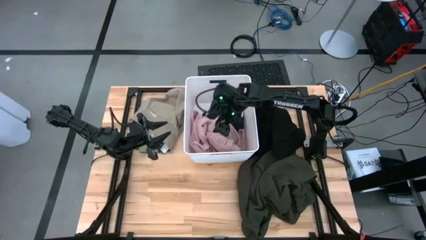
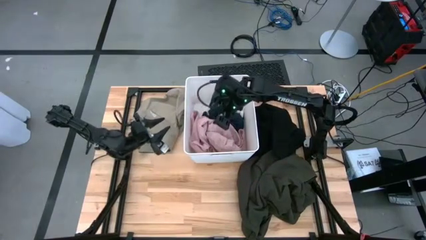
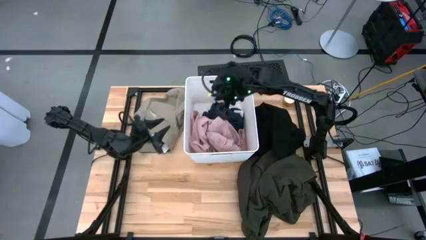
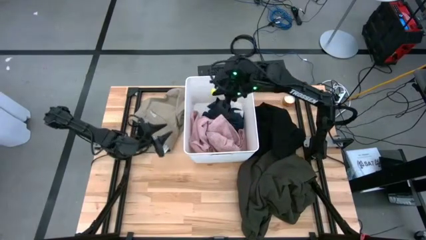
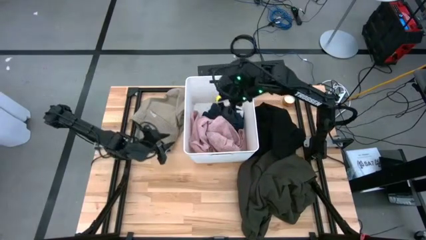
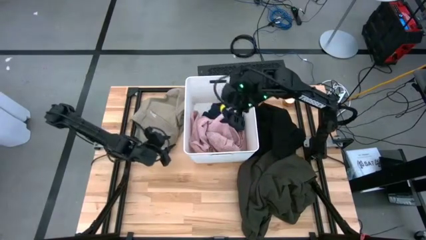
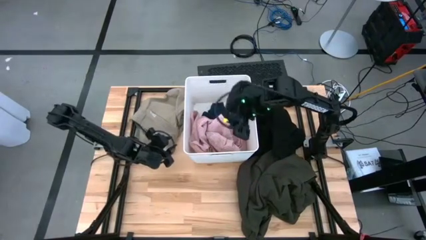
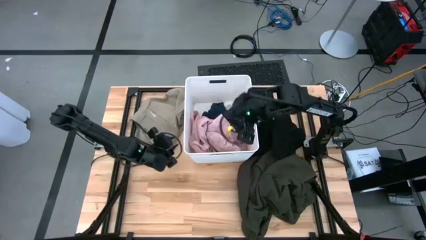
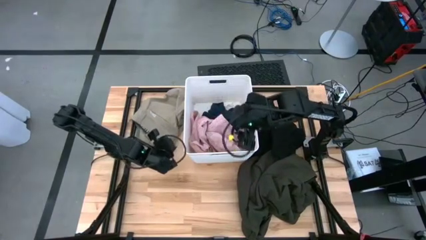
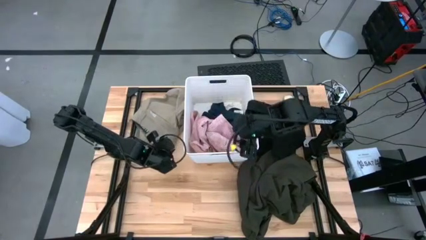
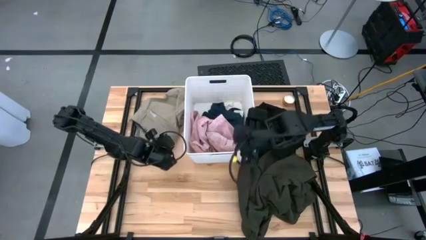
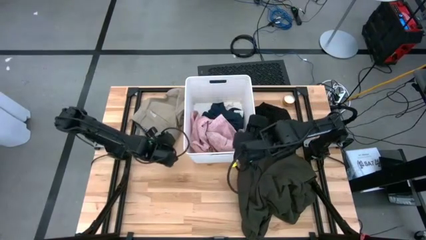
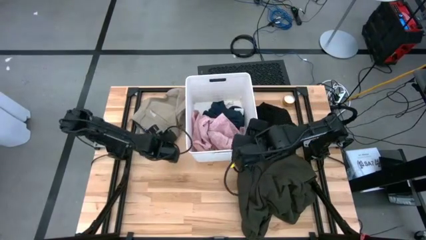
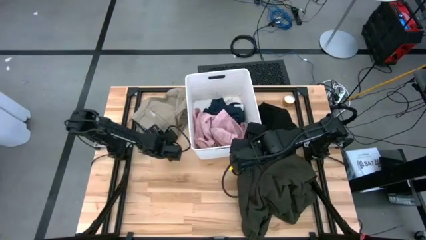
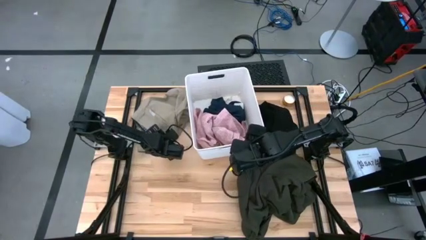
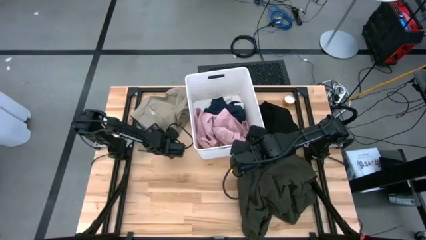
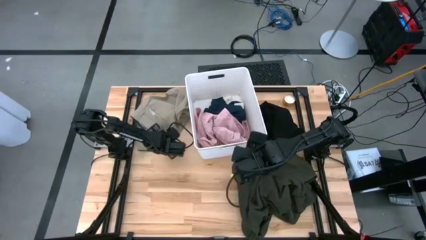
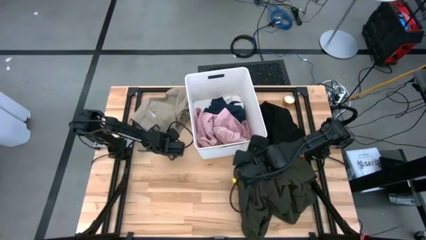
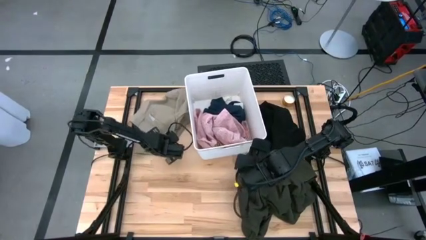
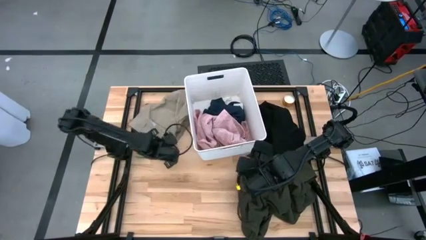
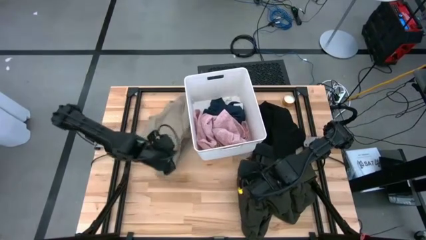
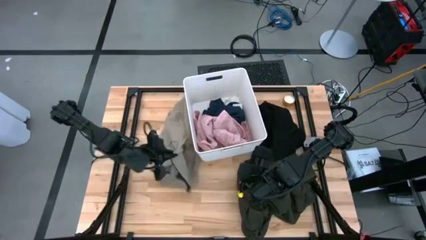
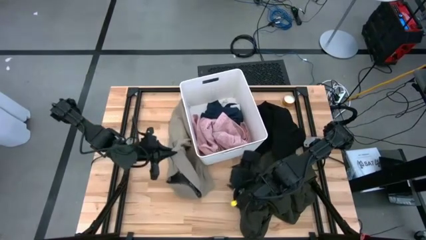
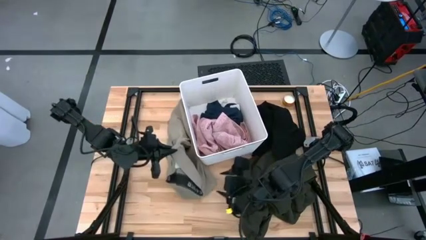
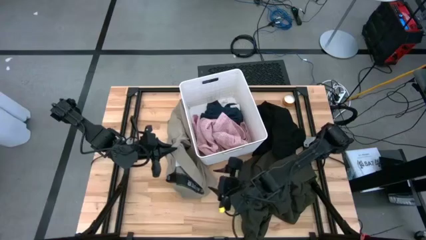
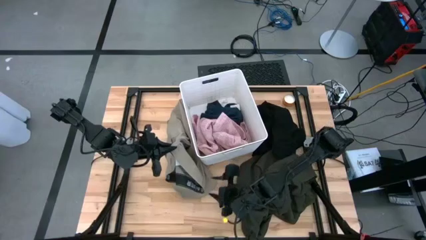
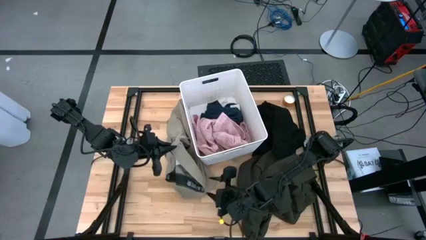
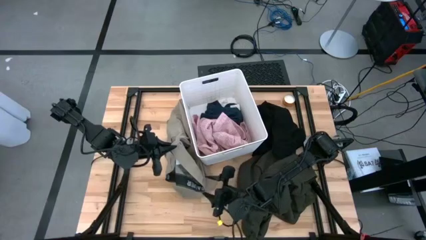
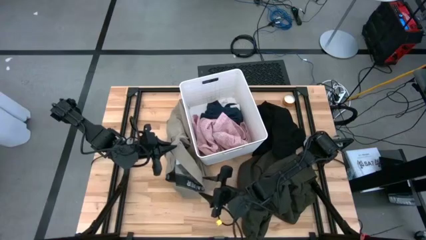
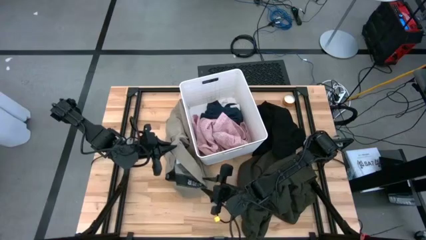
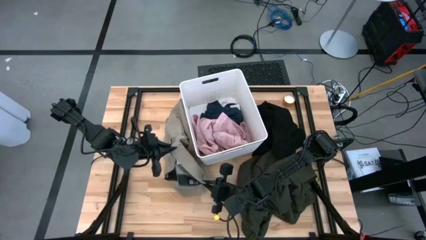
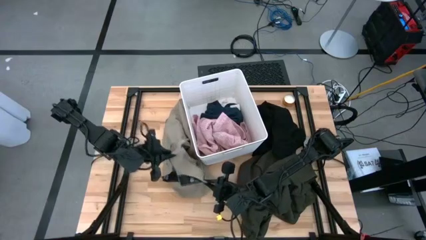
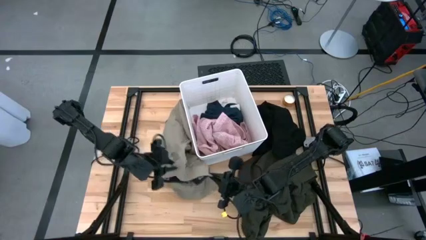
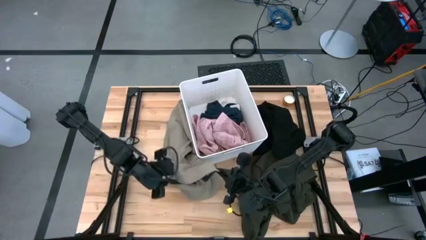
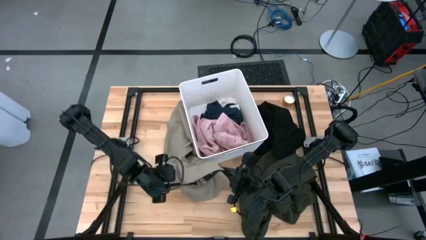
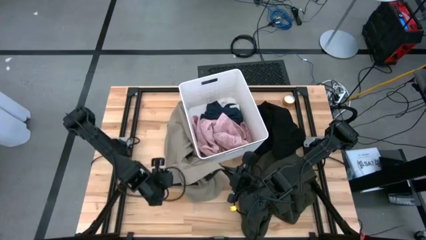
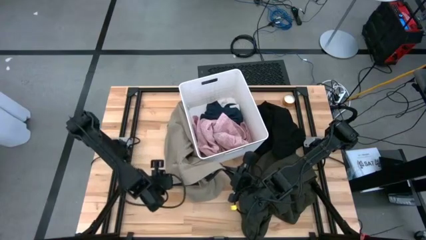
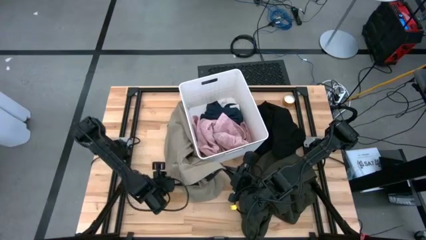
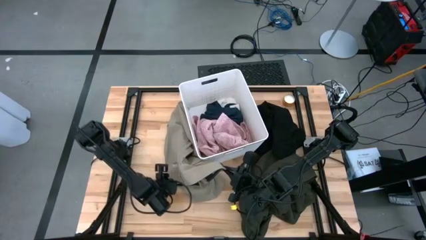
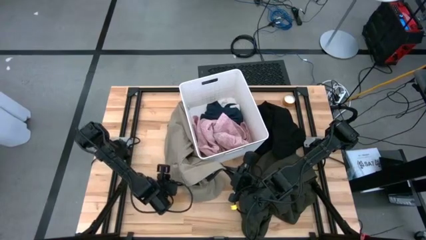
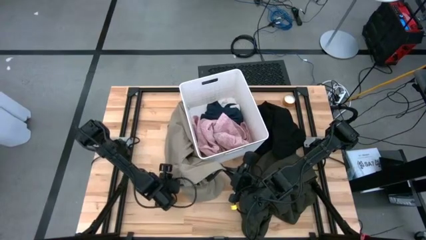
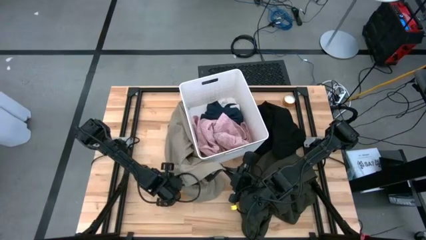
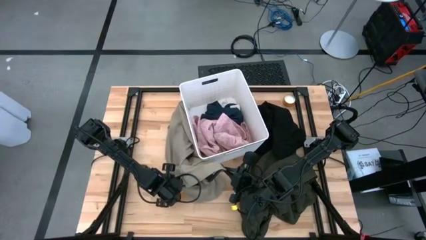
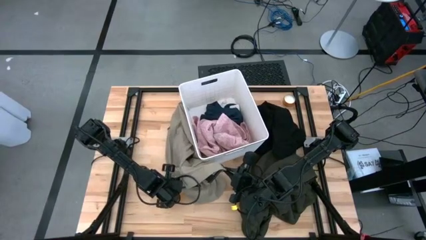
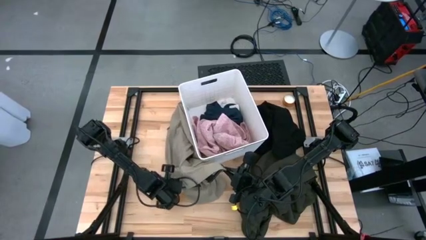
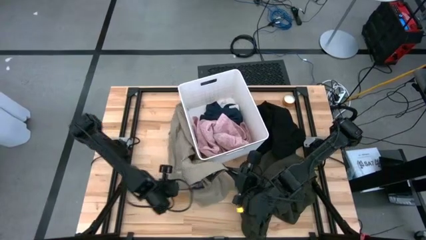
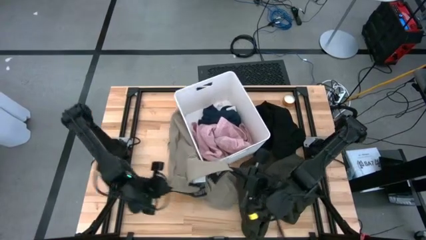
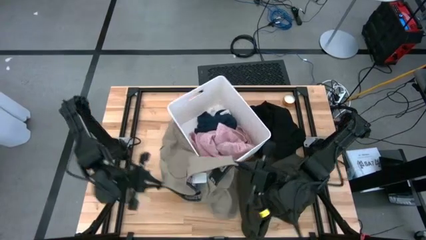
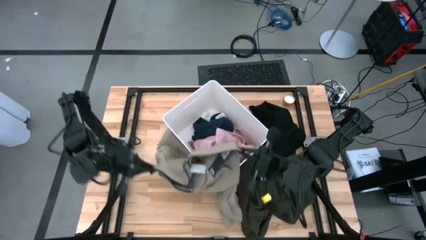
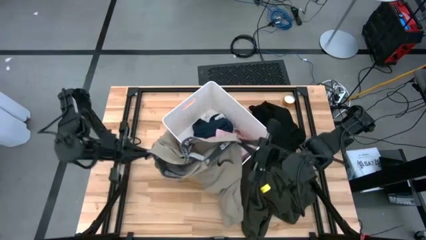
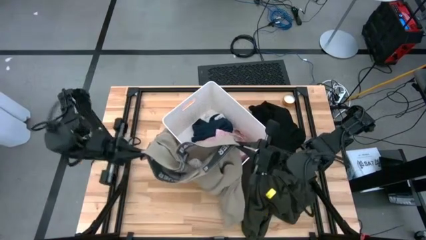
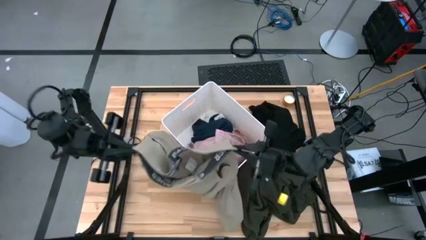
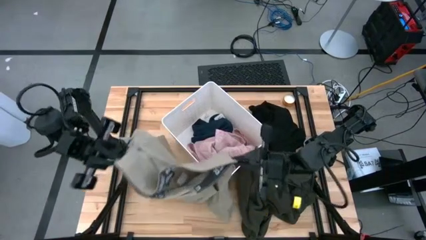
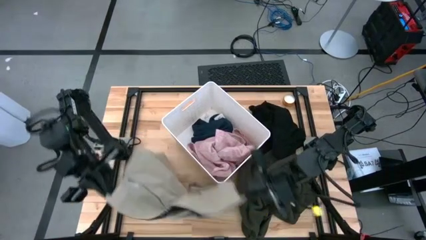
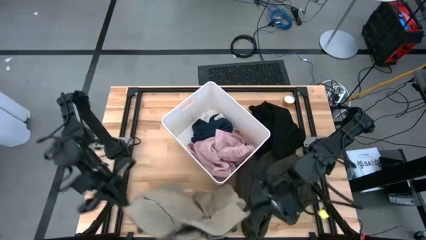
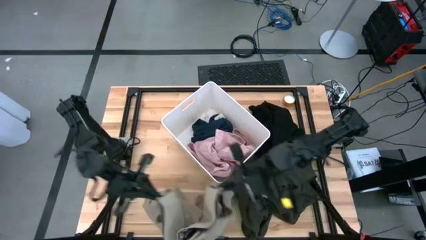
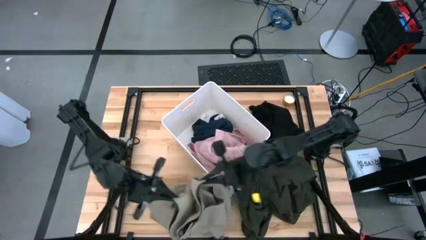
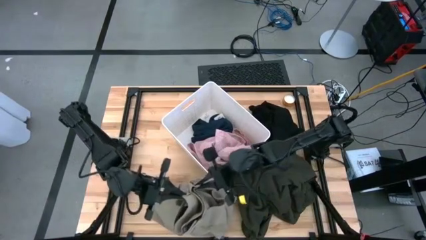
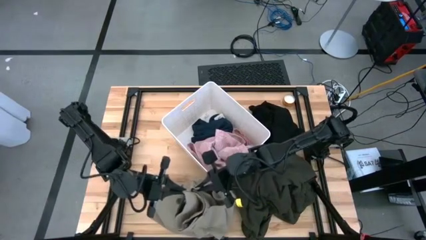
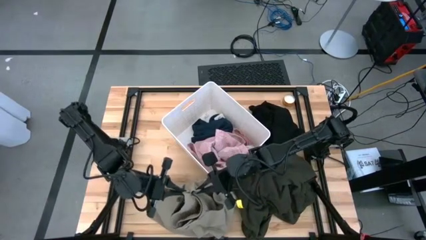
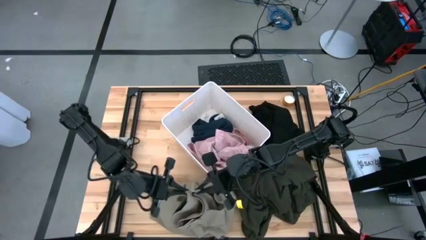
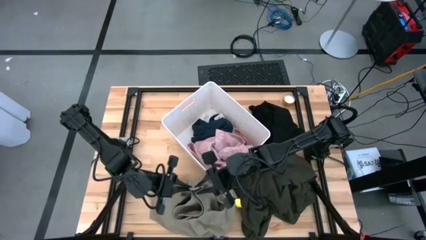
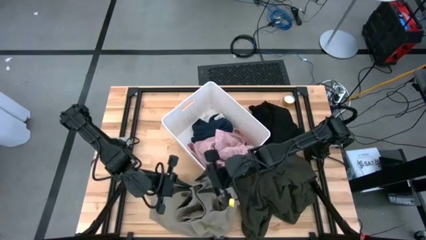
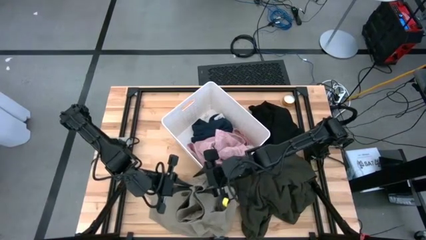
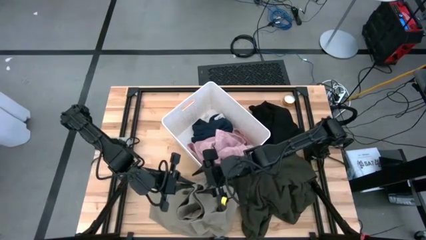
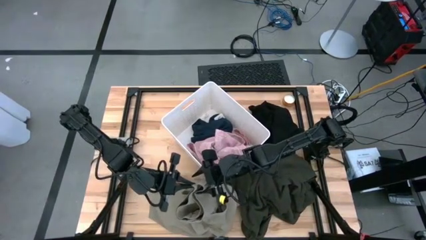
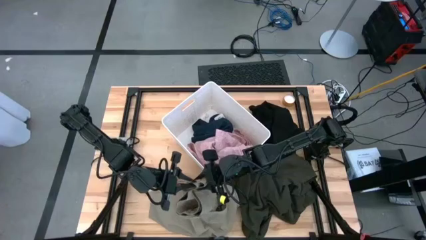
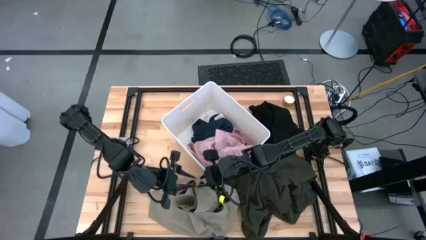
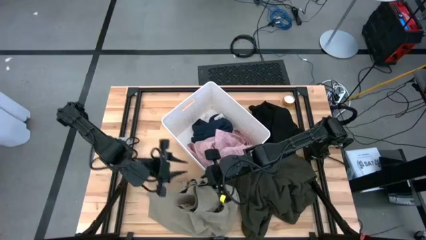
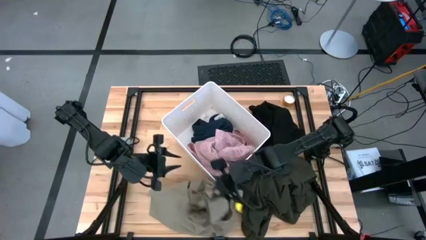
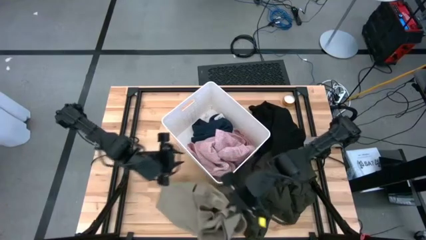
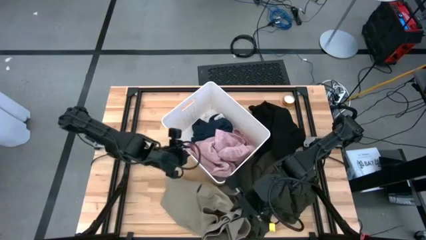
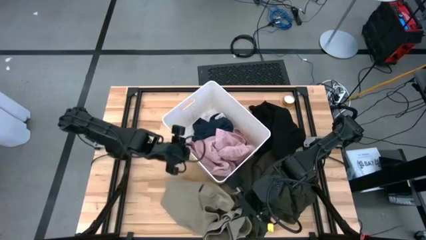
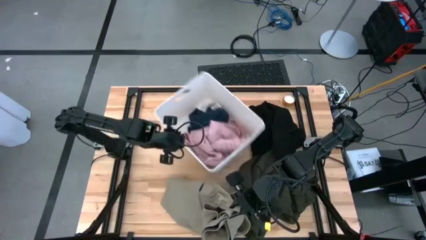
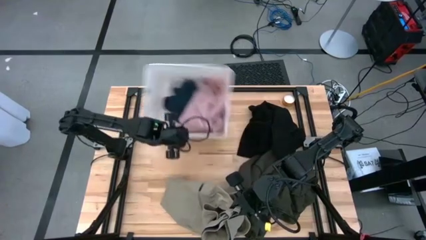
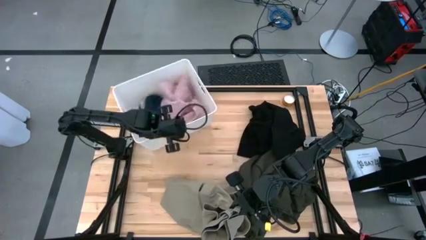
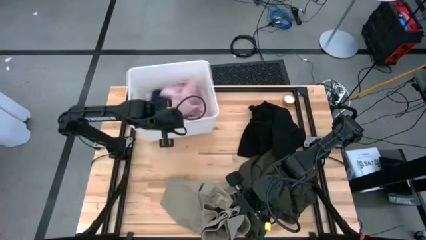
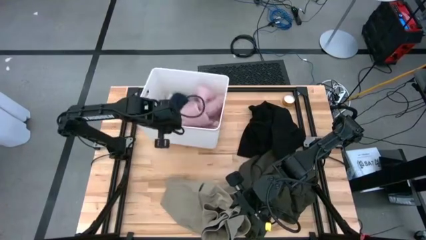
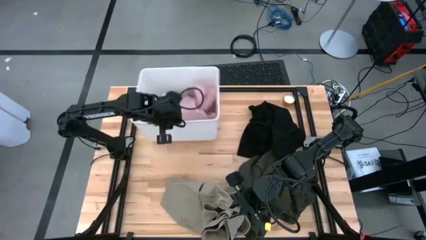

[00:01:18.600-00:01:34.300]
Task: Sort clothes
Put the brown shorts into the white laundry bin

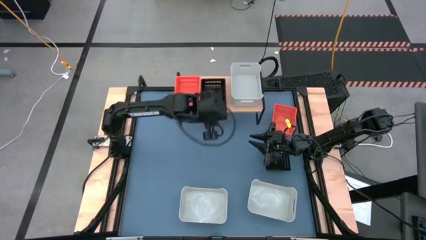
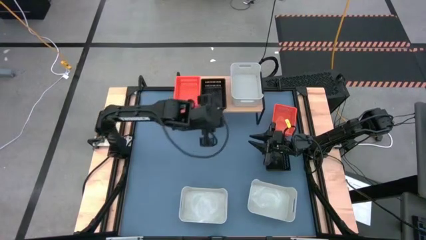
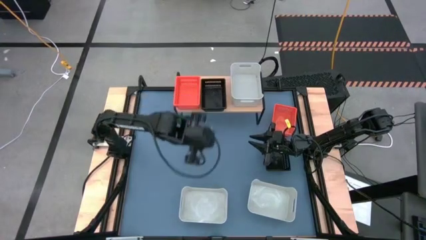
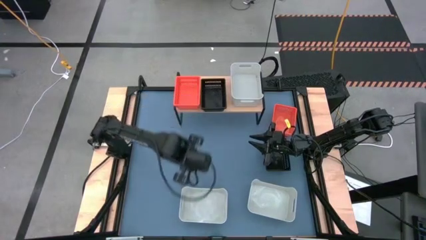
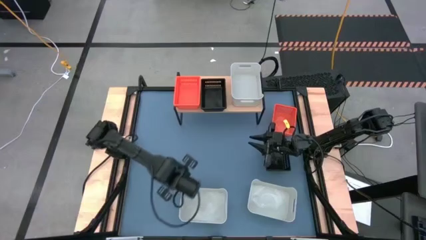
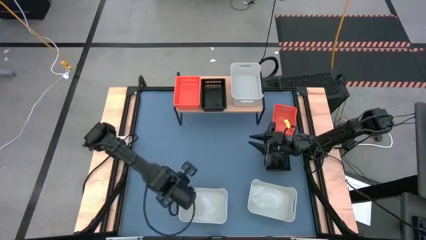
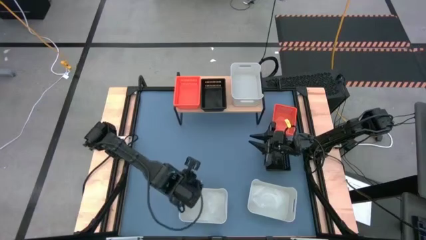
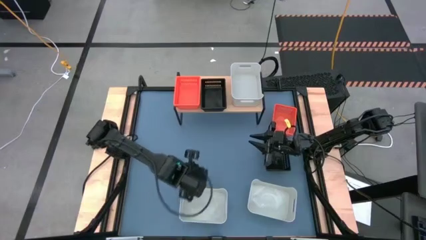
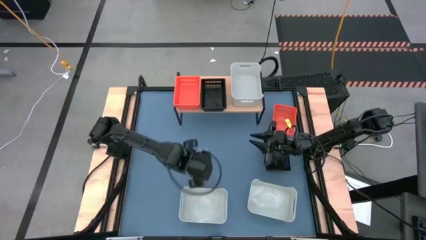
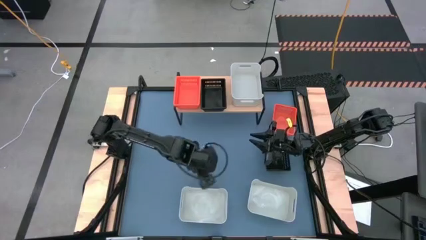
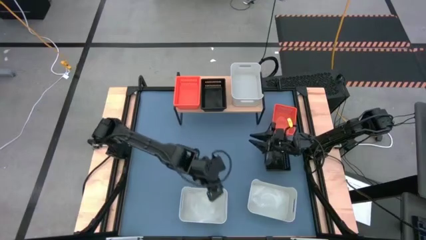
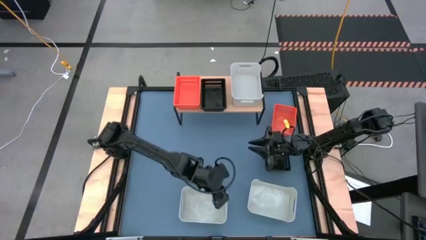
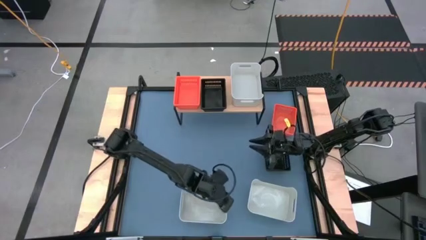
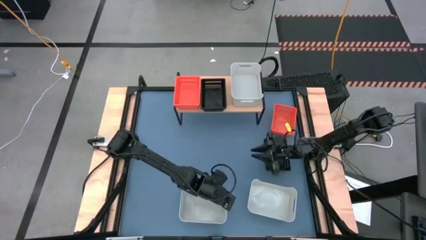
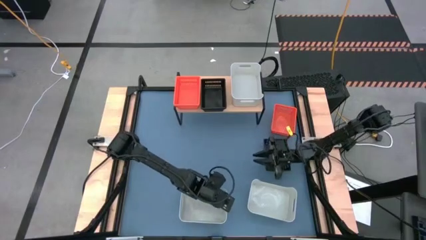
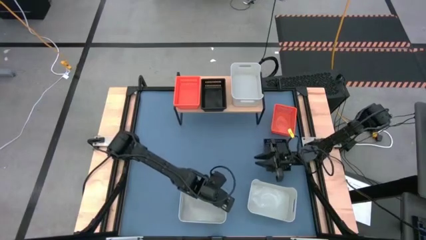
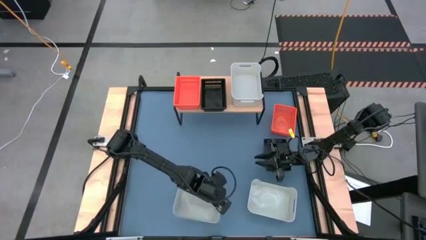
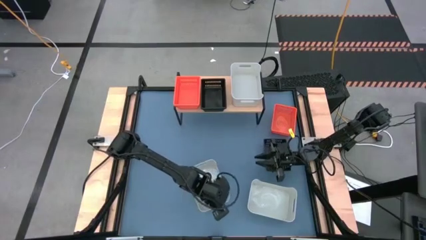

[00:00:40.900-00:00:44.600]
Task: Stack baskets on shelf by color
Stack the left gray bin on top of the other gray bin on the shelf
